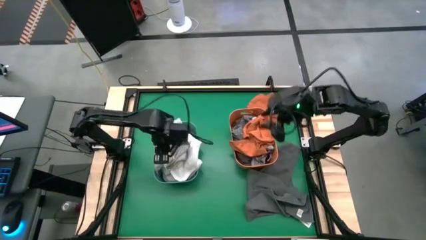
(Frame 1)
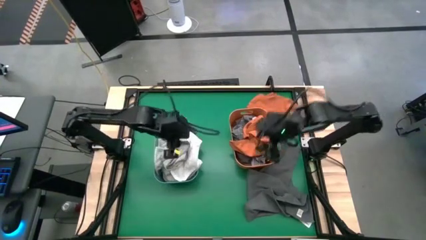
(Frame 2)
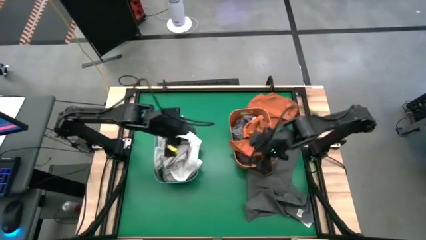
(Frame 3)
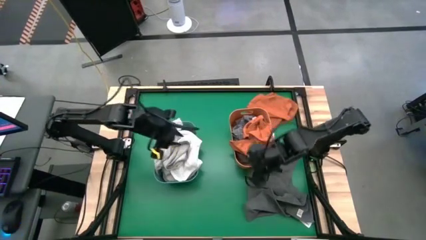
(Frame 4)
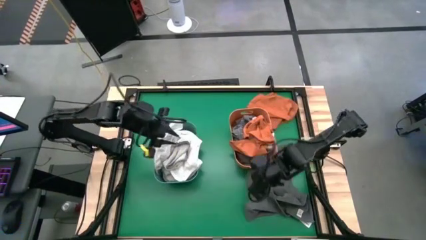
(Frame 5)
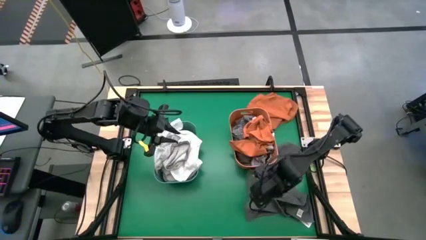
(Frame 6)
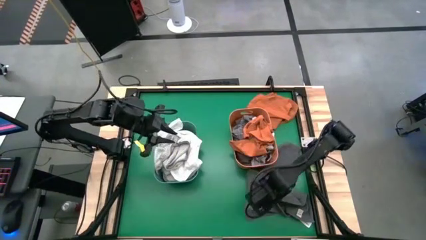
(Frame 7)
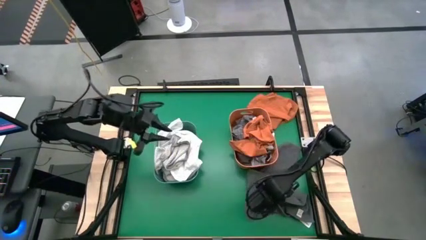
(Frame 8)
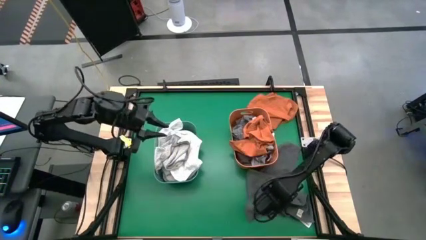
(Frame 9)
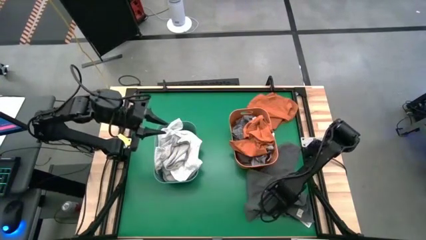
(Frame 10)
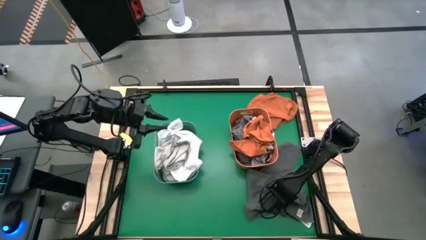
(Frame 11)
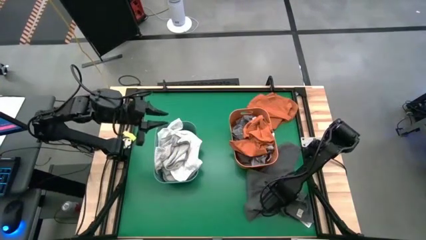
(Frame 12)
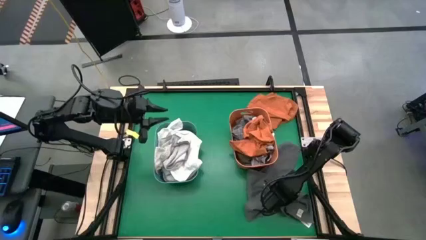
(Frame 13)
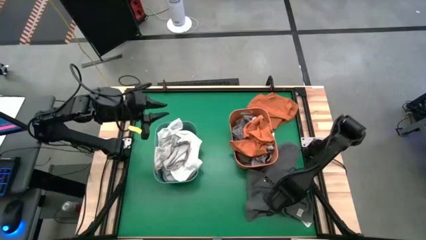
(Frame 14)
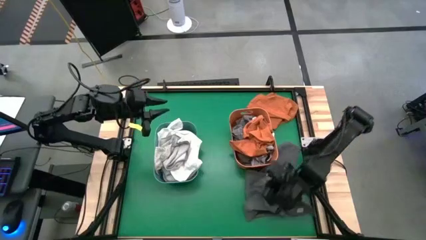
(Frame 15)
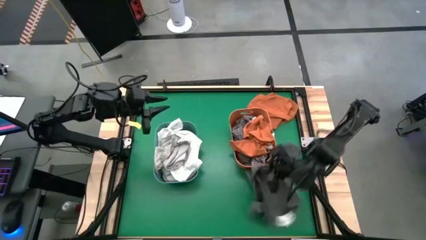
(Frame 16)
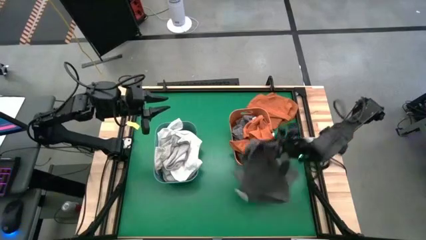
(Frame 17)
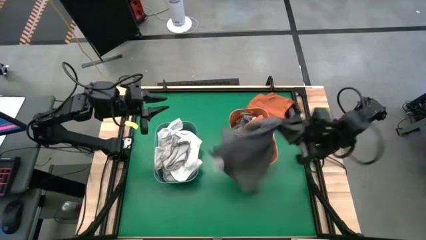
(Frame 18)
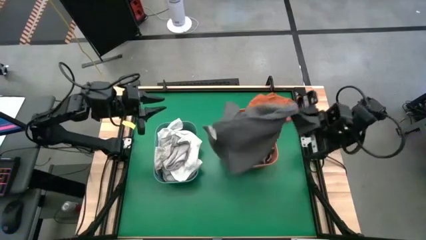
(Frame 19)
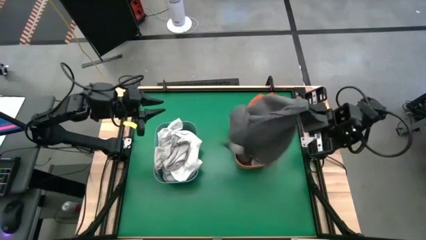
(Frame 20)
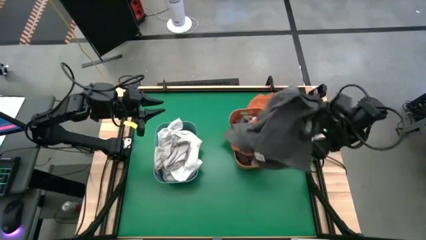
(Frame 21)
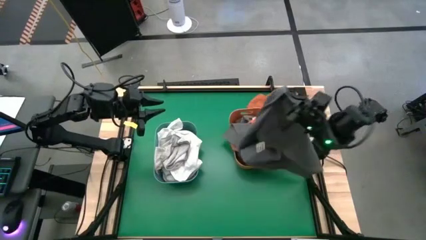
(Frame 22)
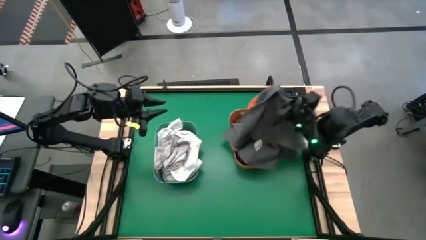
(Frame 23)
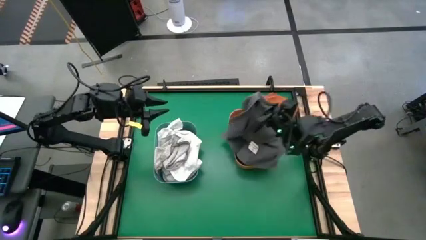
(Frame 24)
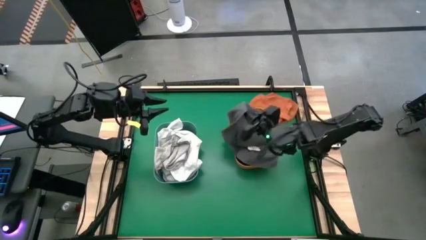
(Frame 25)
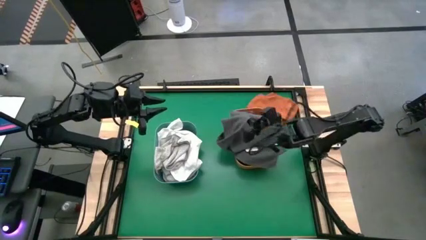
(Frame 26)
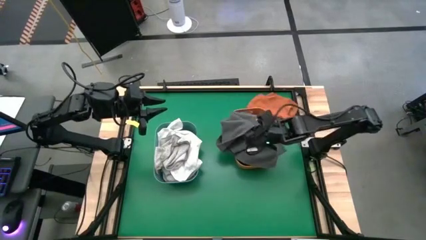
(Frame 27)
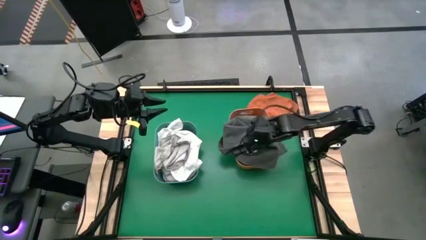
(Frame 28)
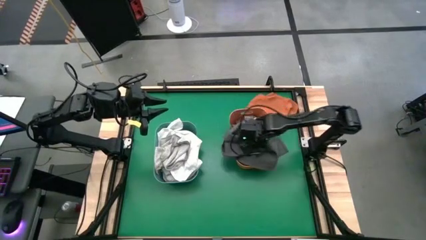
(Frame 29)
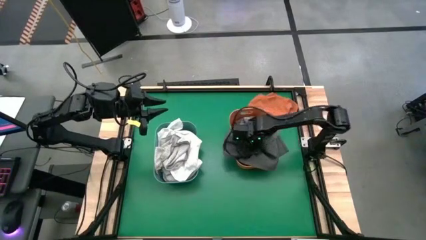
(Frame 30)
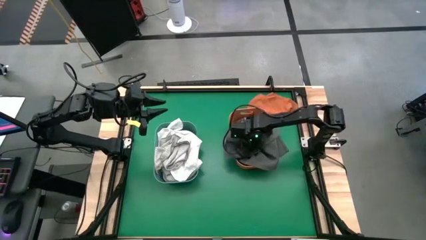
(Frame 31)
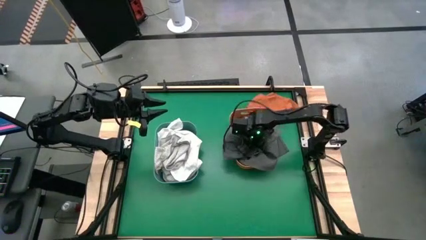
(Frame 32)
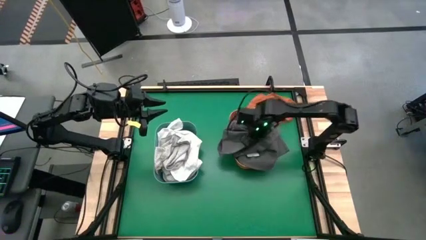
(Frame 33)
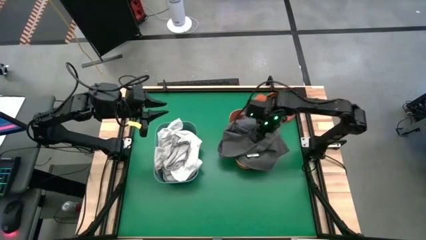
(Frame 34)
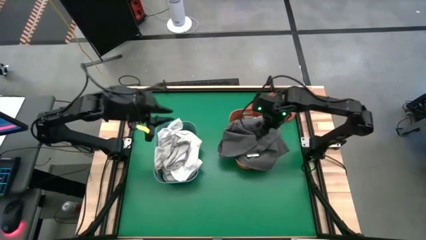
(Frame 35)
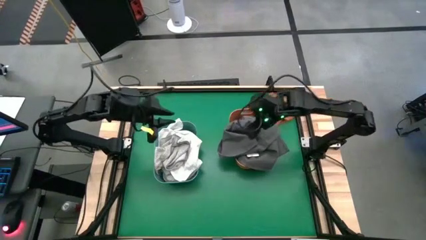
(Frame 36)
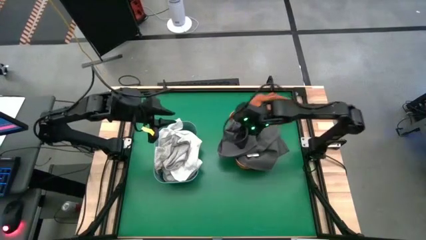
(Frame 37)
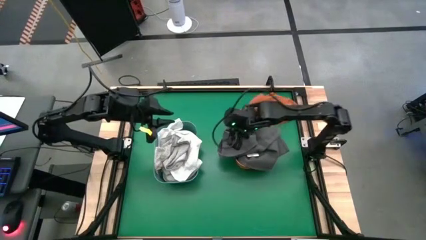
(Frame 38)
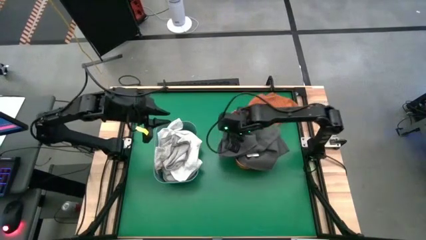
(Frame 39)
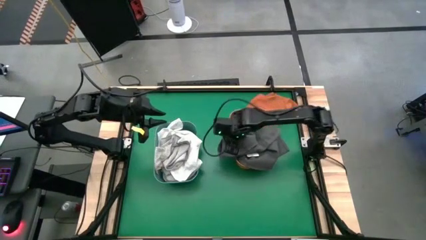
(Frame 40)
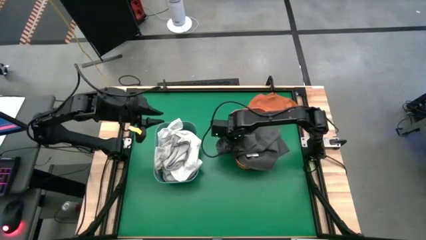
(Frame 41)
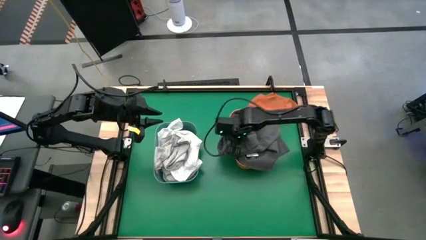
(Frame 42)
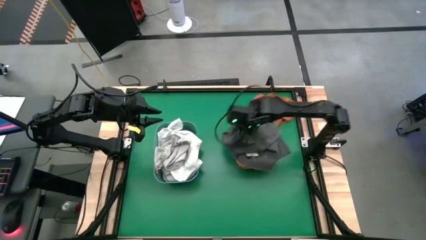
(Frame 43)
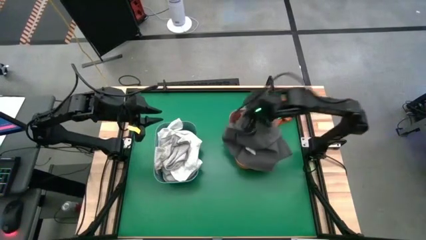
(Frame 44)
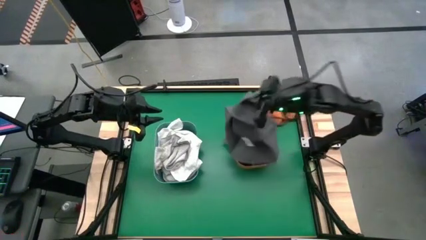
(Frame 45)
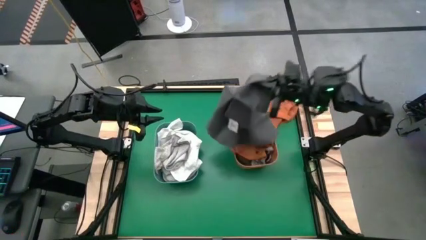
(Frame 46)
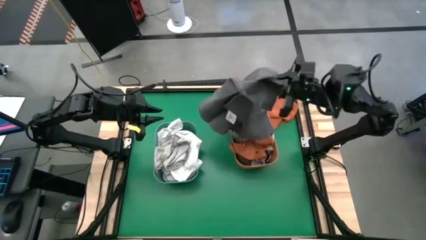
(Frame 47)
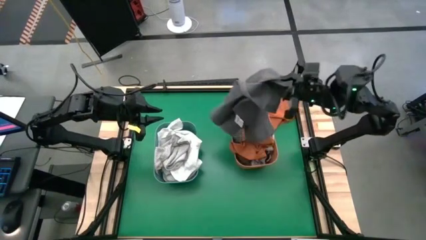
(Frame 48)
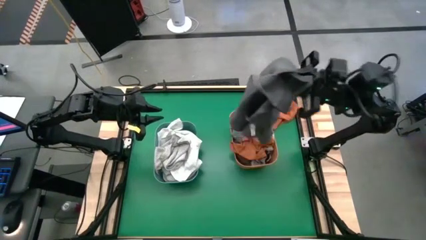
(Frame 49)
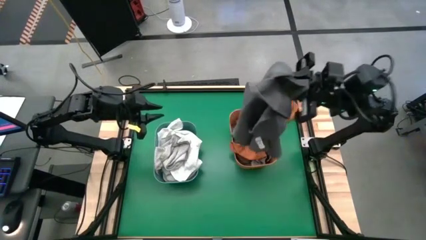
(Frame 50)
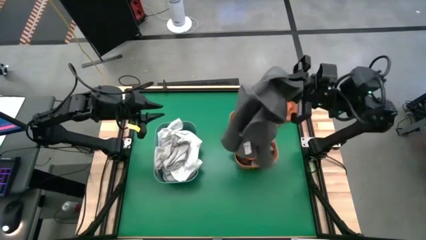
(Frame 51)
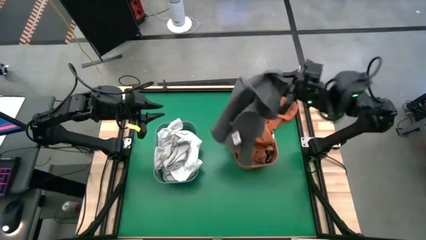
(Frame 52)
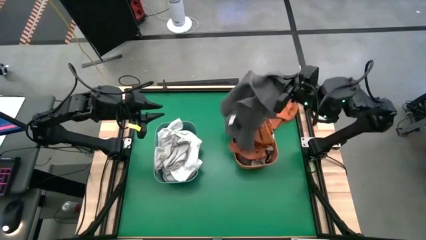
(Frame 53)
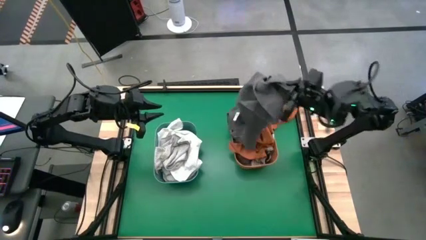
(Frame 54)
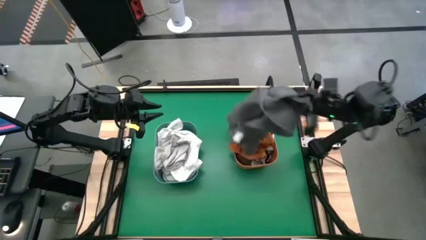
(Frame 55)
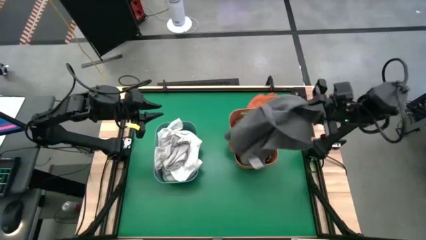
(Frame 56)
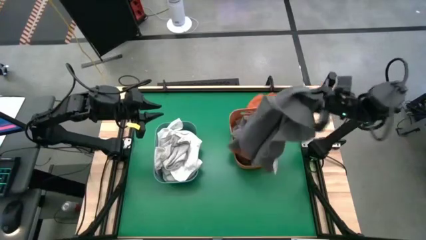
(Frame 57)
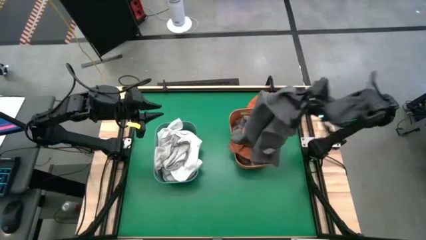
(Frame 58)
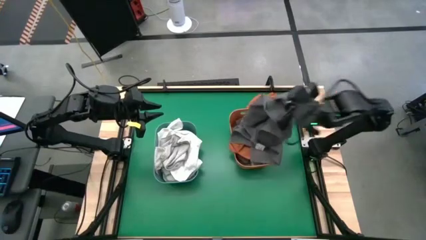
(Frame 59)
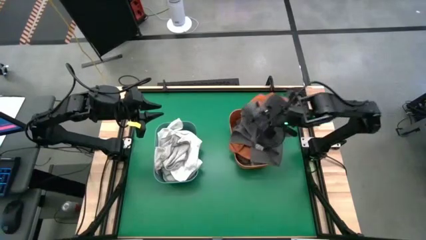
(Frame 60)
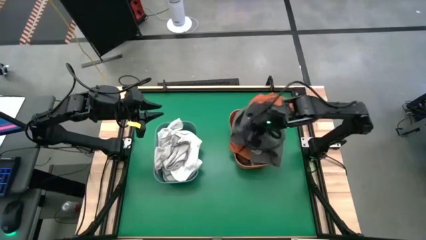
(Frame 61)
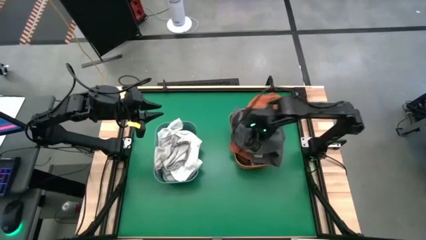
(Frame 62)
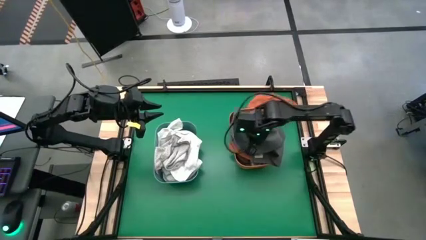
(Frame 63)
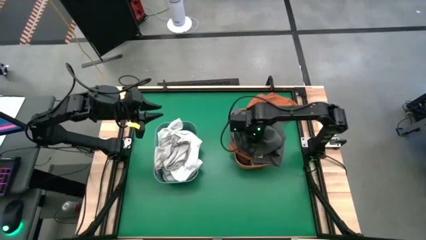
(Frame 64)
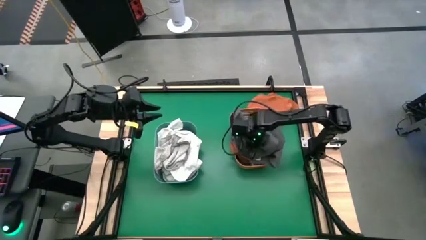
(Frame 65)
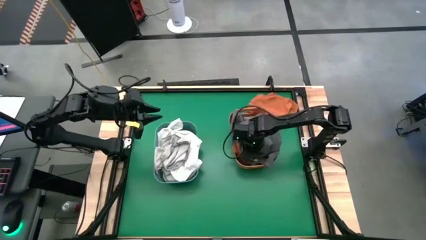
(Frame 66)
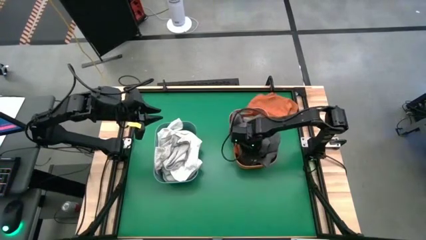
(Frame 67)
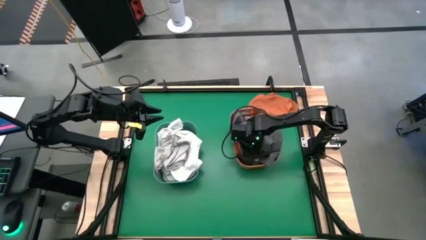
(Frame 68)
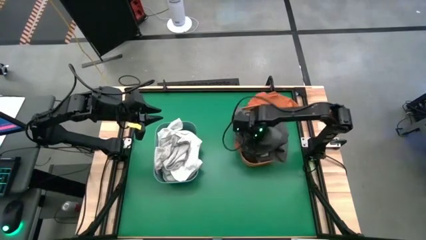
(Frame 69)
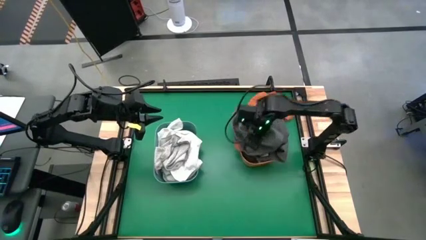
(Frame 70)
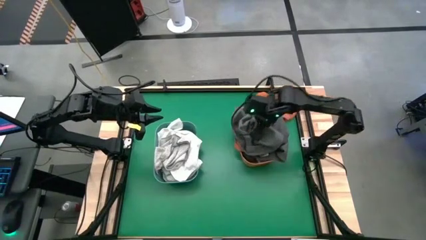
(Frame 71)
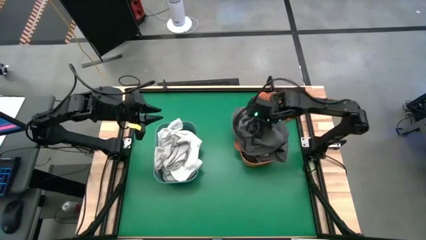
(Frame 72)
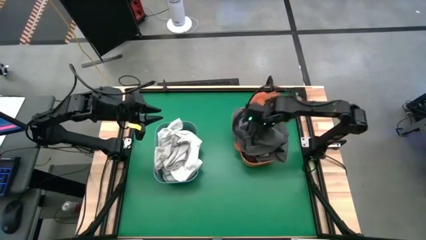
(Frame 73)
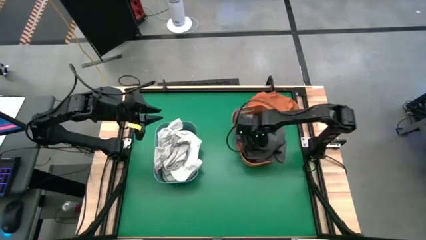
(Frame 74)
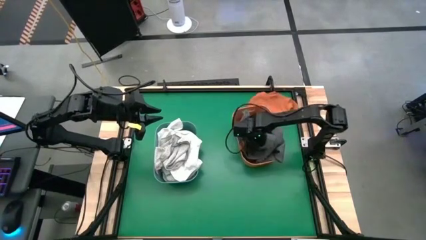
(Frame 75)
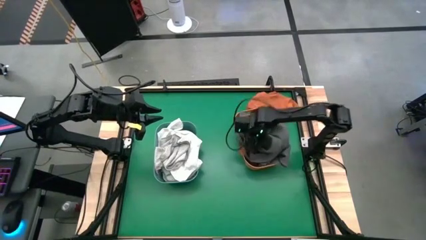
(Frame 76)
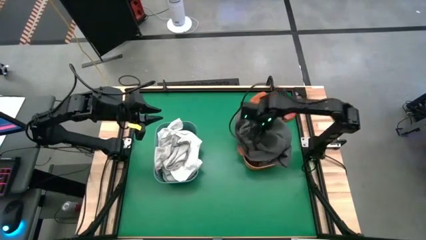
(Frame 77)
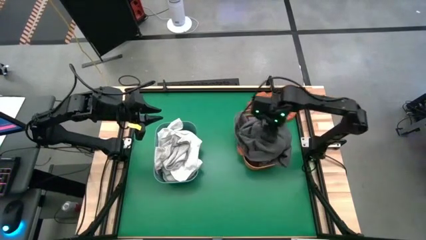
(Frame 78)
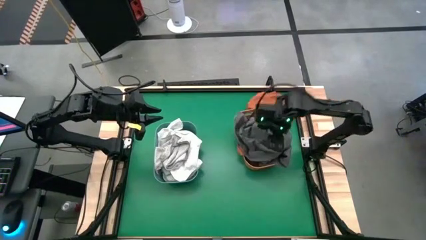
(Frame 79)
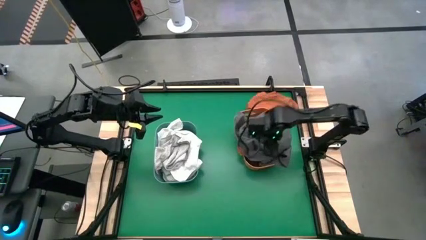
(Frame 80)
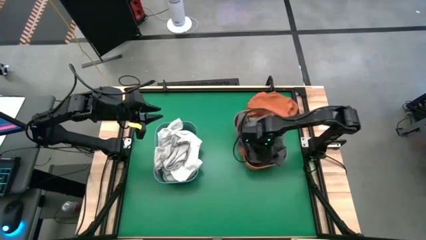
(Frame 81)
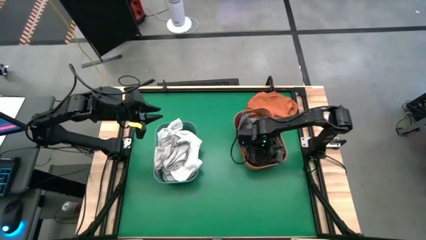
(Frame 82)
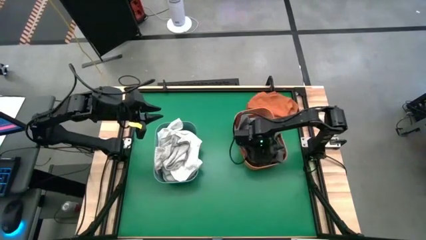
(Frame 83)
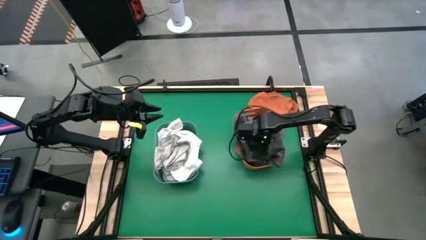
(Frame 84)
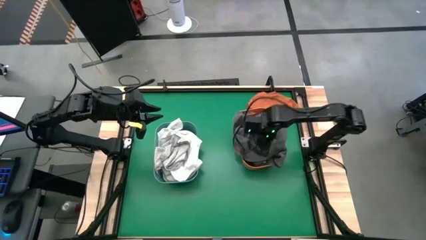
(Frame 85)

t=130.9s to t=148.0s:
Task: Sort towels by color in basket
Put the dark gray towel into the orange bin
